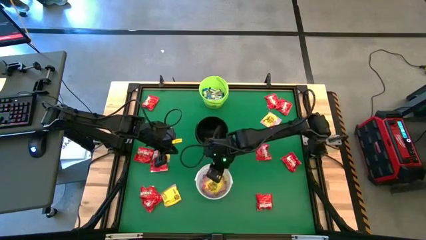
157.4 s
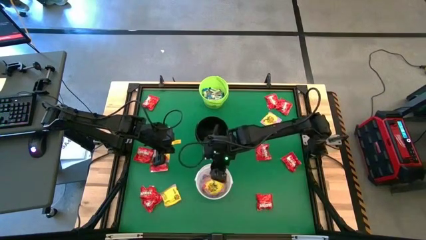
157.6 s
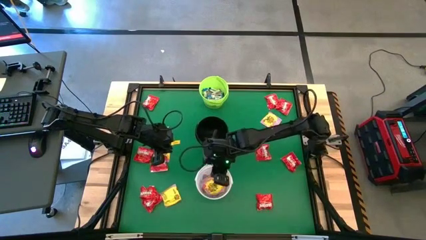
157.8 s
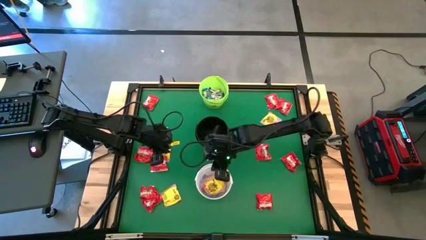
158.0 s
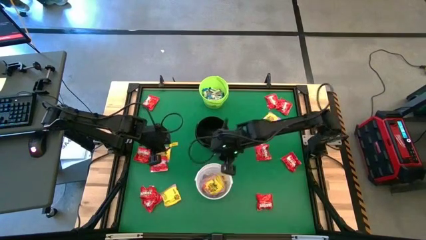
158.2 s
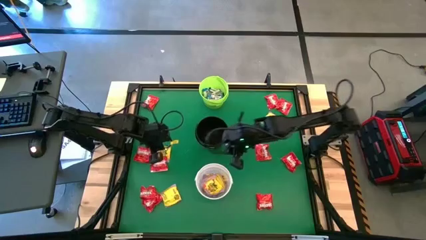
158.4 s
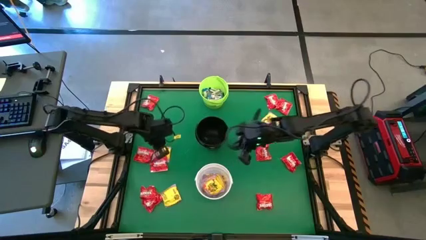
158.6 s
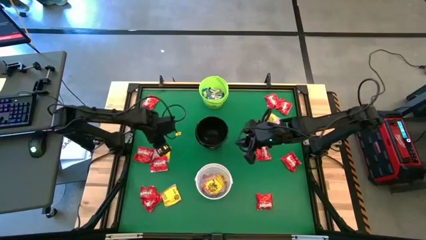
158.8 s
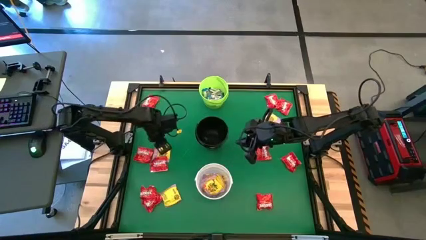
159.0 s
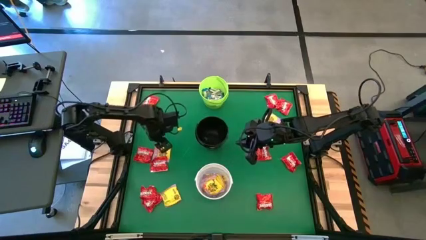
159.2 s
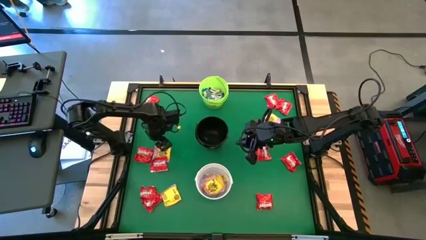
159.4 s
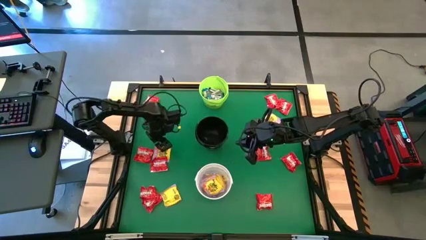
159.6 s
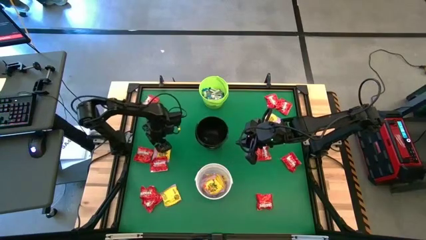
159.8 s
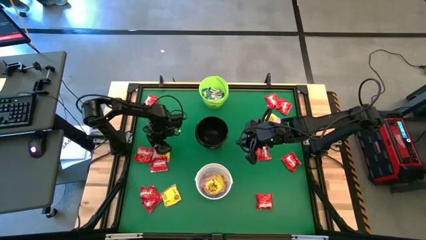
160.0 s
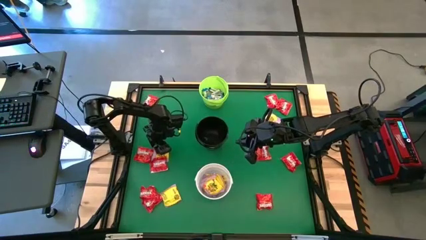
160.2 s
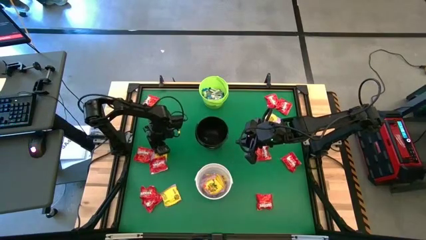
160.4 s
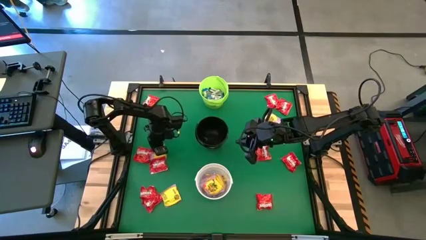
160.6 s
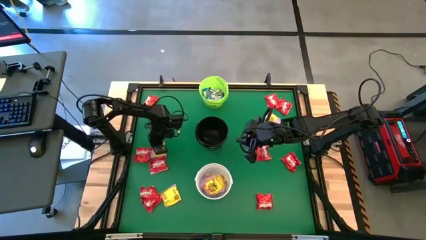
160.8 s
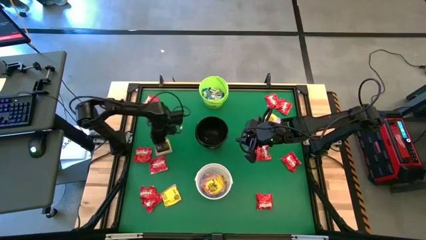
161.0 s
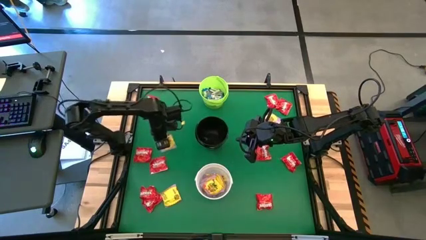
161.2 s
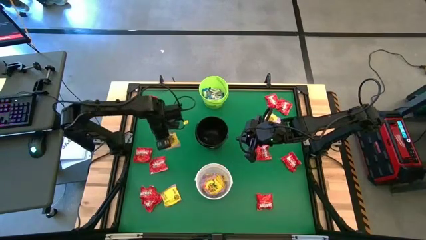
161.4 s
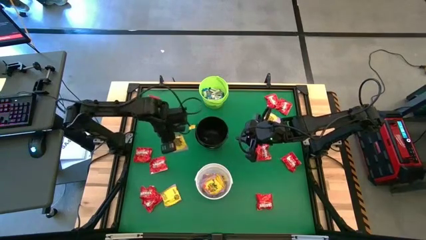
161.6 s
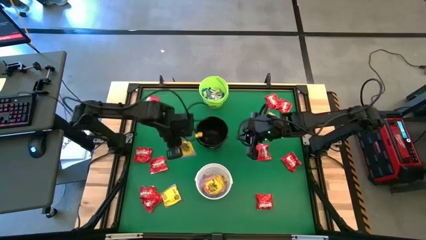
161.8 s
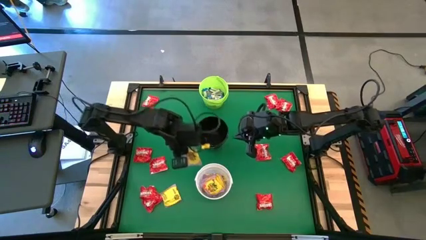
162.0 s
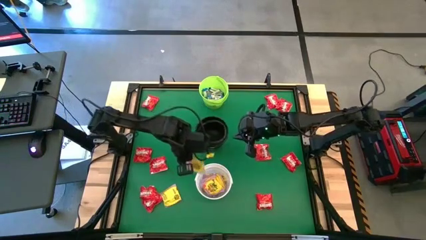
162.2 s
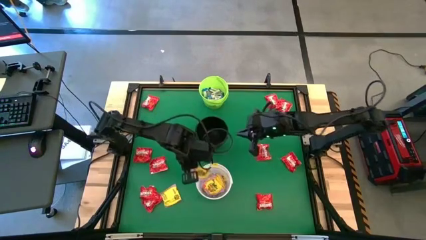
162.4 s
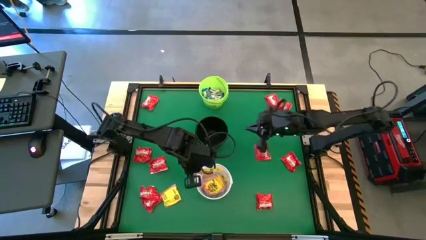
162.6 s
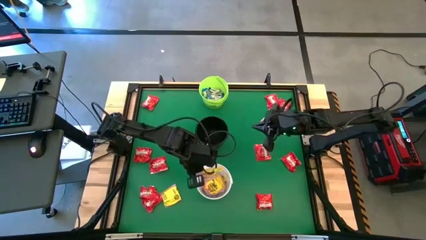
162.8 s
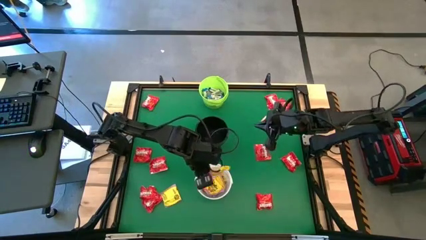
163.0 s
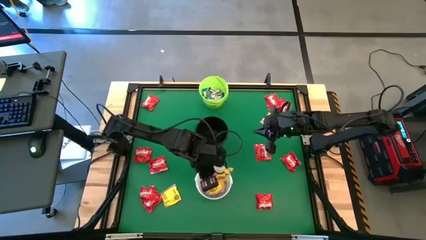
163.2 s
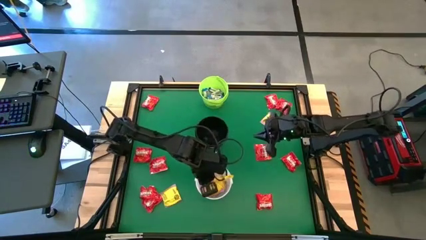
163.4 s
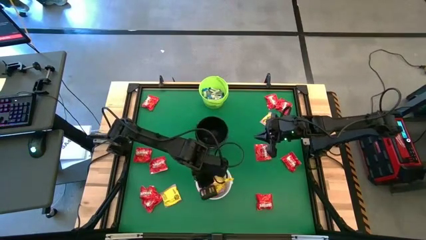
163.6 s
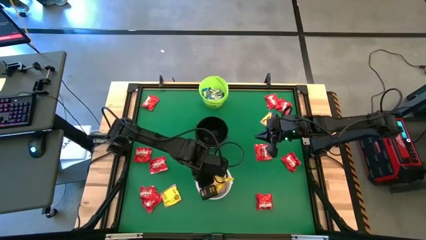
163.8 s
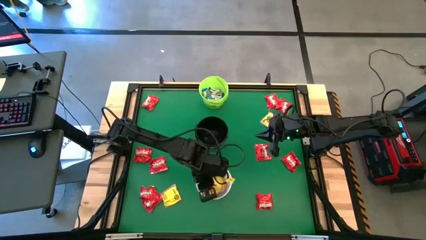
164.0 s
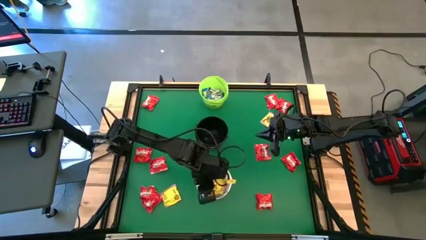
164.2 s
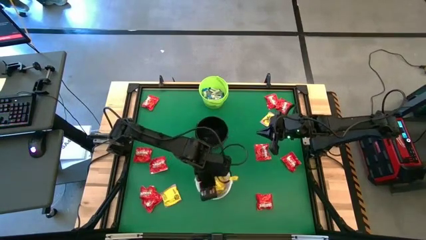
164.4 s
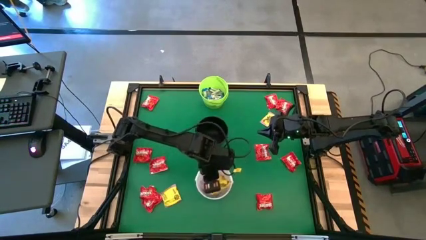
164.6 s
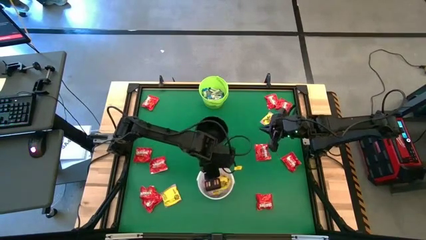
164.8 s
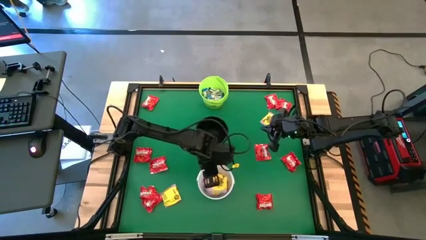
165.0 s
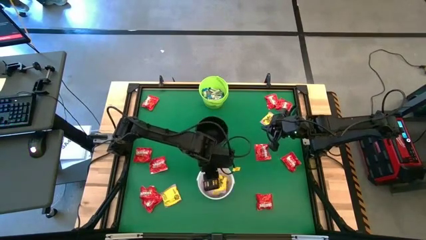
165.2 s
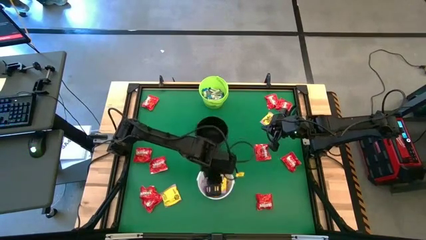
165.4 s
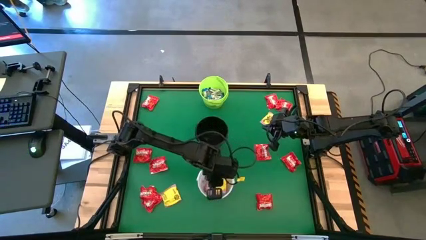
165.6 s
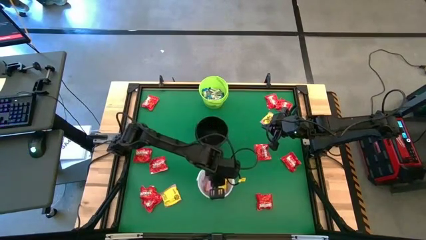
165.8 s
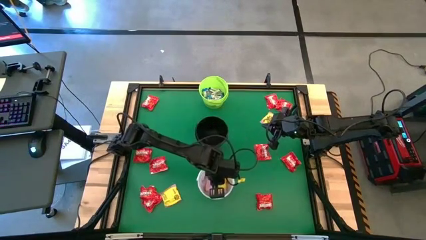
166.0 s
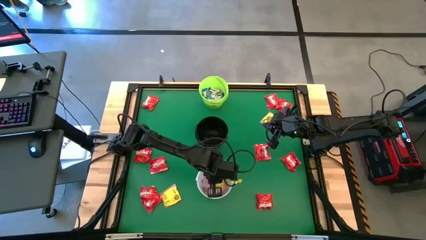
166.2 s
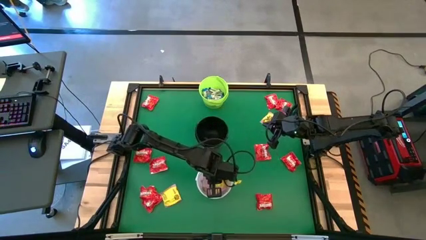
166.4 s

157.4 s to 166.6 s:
Task: Sort candy by brand, put in halloween buckets
Put the yellow chocolate into the white bucket

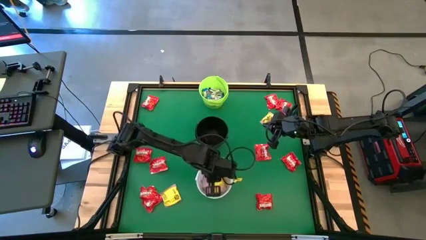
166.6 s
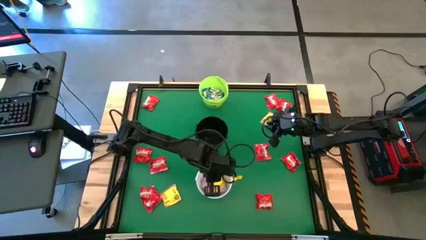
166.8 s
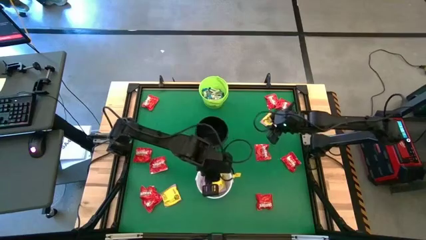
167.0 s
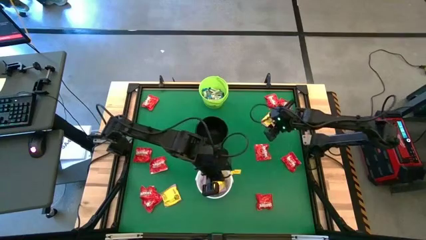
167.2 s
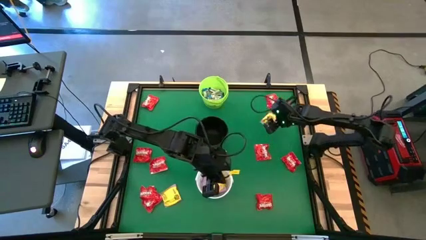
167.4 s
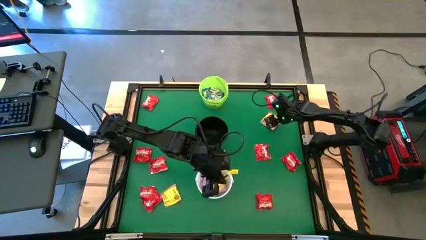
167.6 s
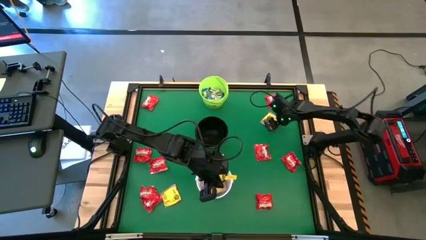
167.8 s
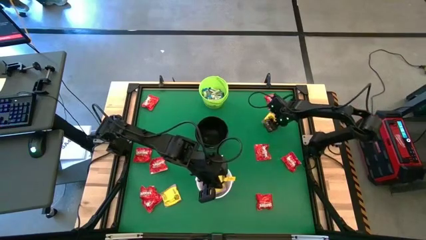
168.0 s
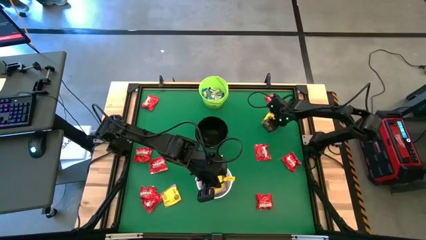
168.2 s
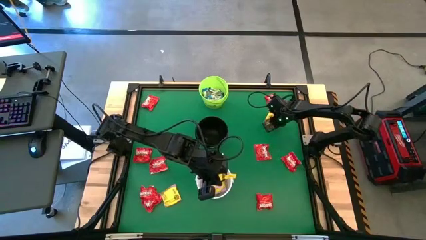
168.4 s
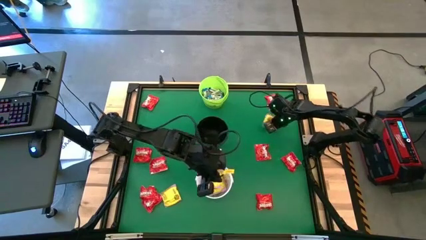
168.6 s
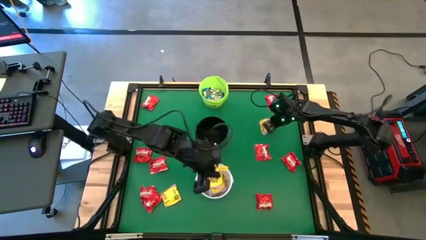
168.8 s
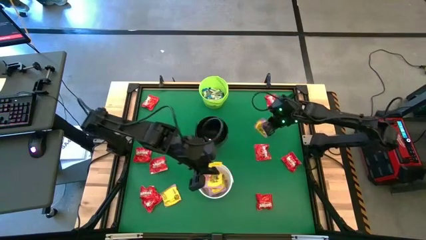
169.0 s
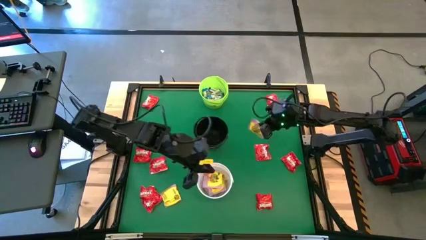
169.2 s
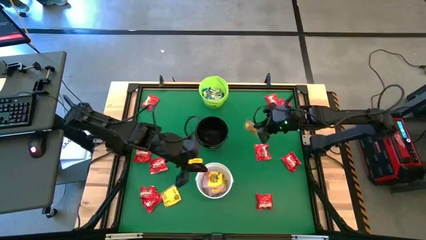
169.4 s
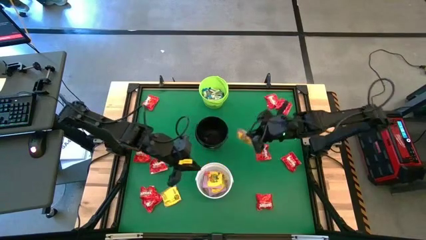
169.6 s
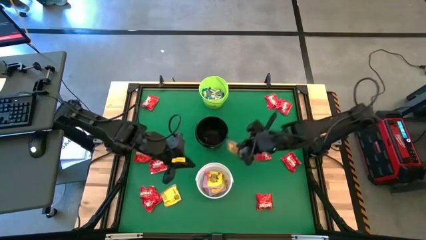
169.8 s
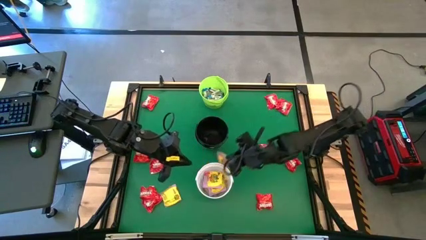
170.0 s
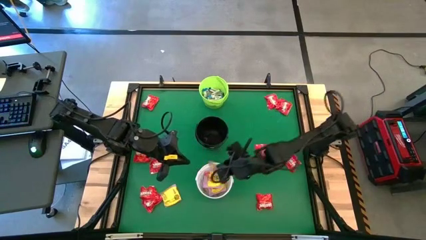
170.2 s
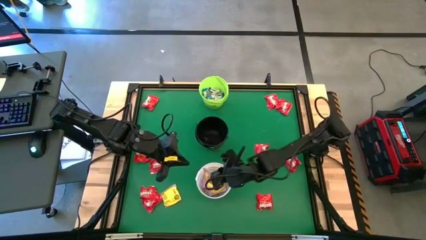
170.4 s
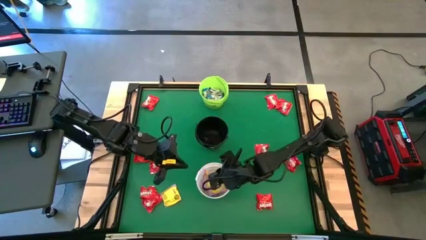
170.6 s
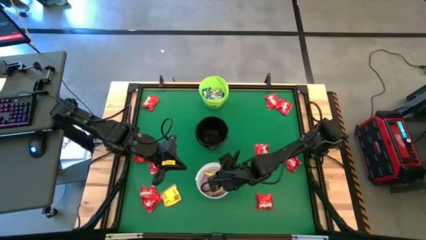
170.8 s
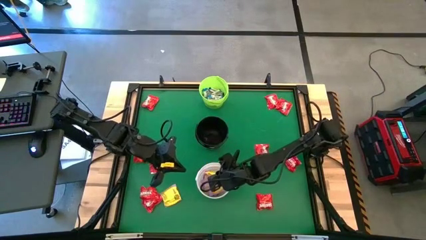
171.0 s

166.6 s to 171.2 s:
Put the yellow chocolate into the white bucket

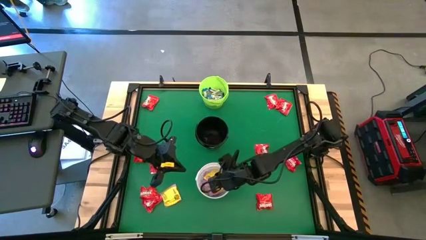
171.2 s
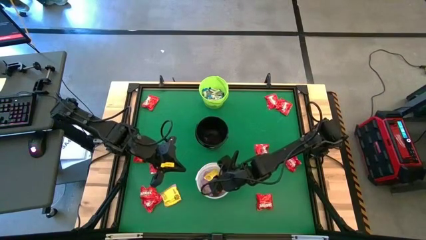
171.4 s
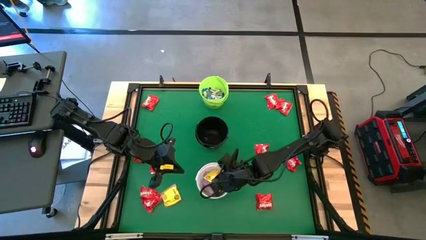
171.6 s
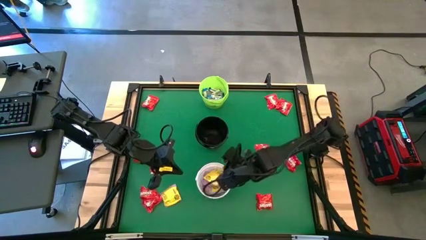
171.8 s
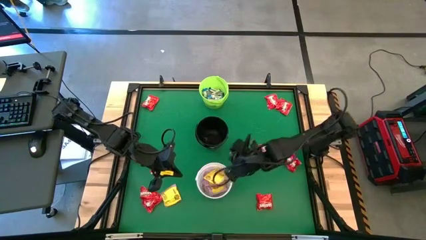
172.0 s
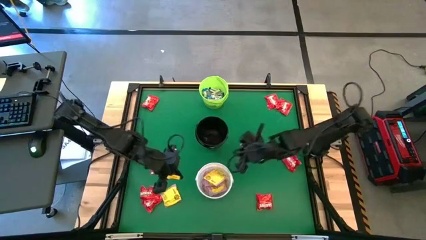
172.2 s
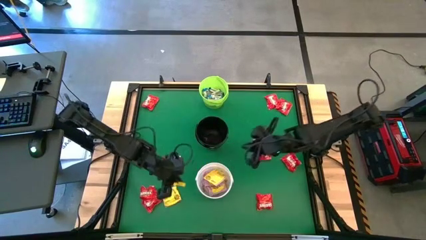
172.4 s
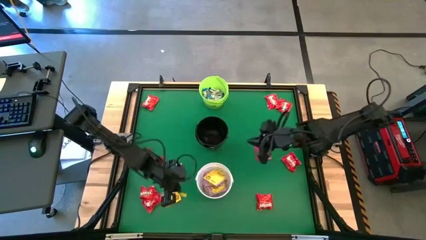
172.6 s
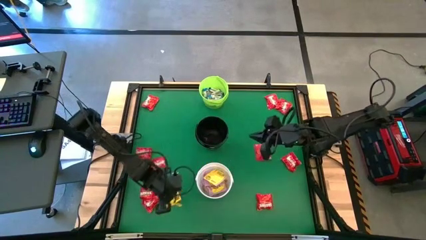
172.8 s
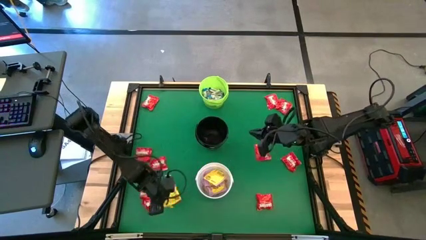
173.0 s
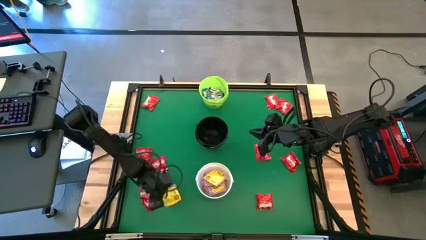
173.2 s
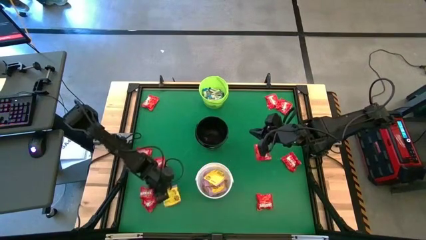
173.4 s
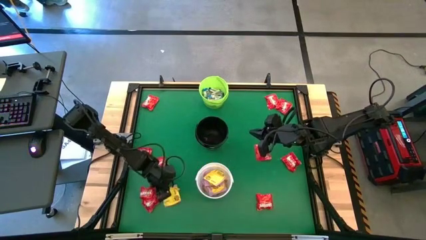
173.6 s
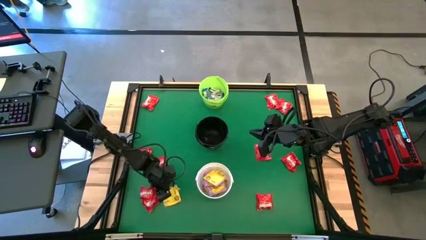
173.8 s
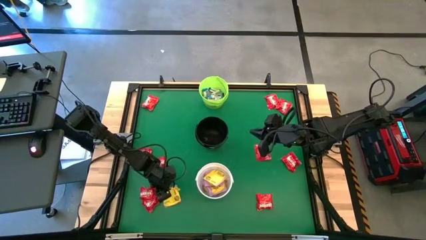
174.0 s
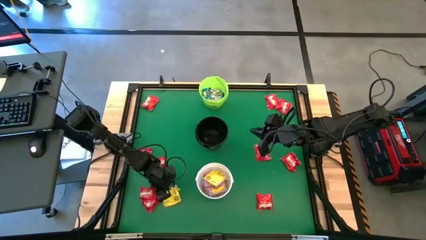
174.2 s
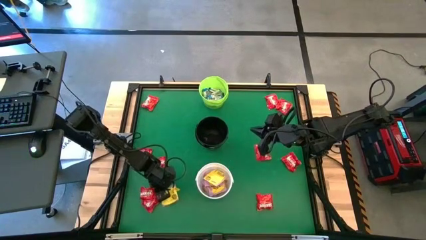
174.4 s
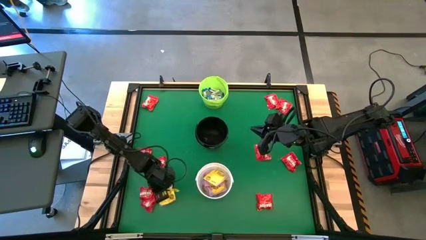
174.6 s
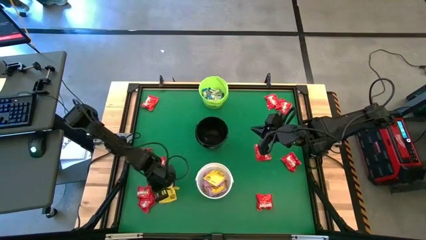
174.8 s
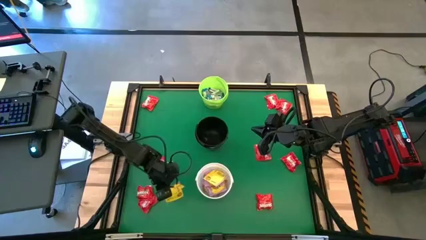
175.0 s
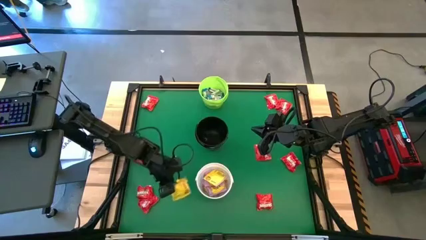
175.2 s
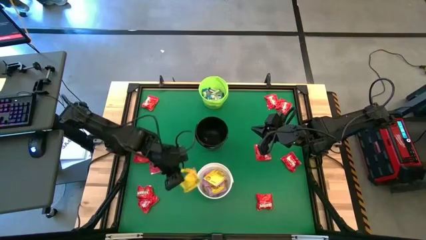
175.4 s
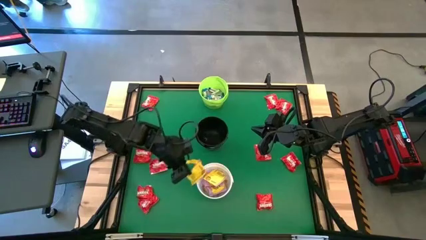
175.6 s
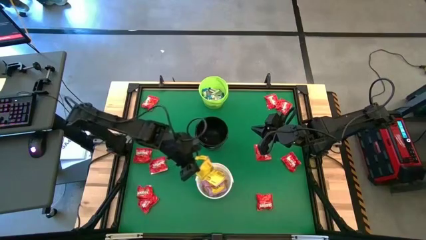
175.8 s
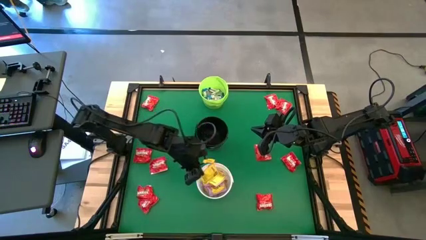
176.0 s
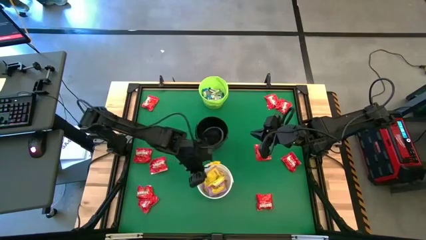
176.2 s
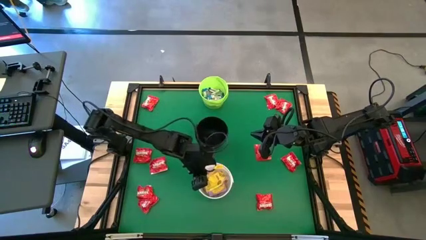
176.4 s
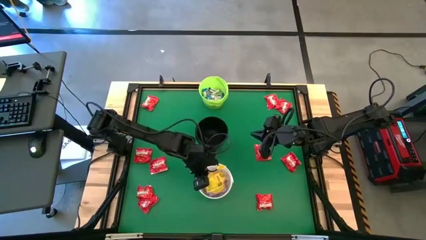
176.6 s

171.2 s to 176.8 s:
Put the yellow chocolate into the white bucket
